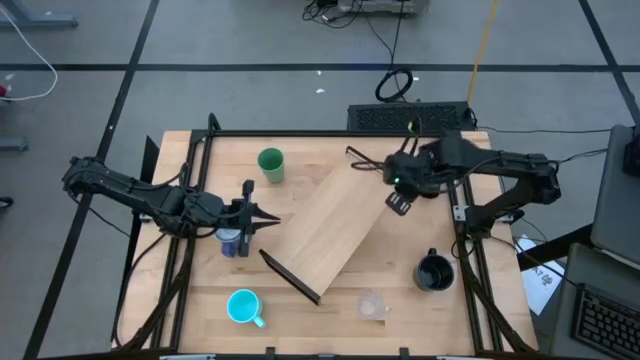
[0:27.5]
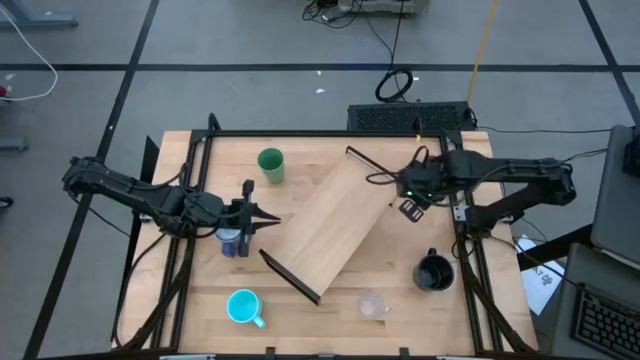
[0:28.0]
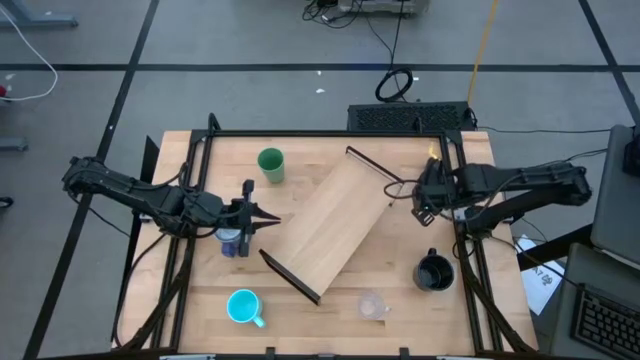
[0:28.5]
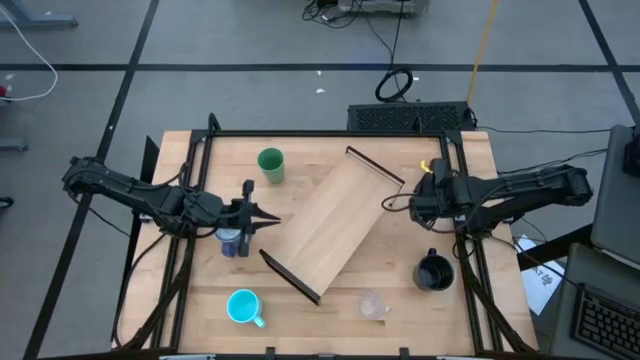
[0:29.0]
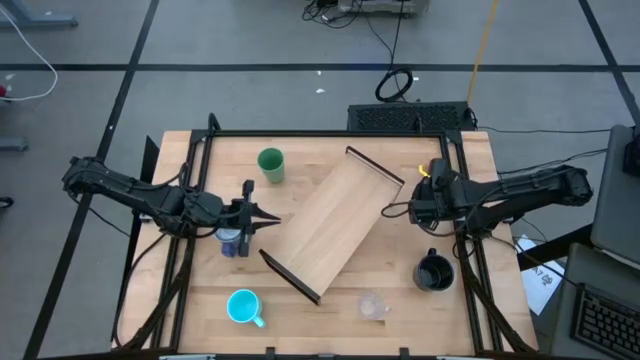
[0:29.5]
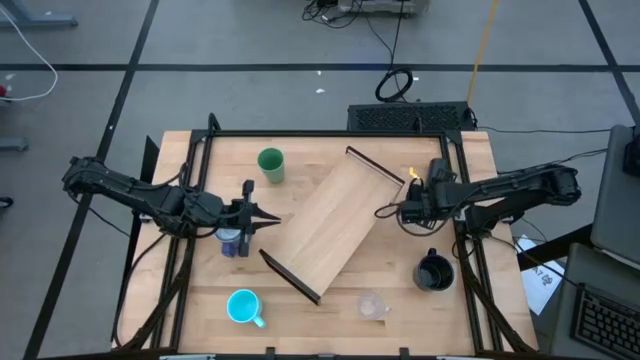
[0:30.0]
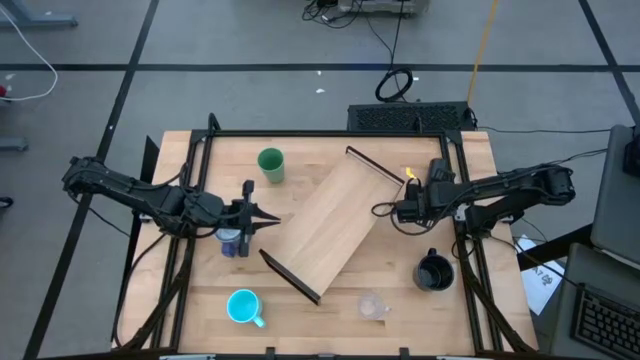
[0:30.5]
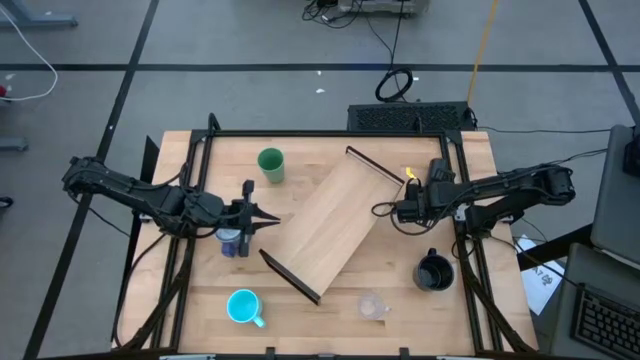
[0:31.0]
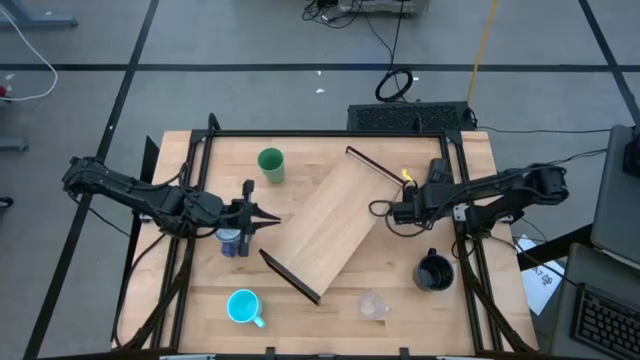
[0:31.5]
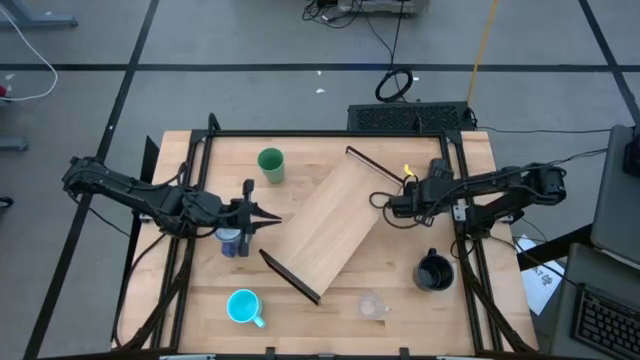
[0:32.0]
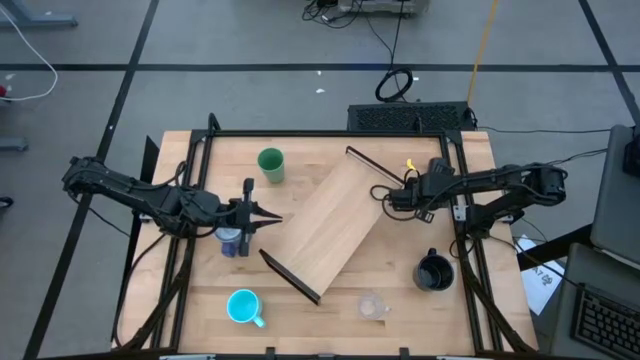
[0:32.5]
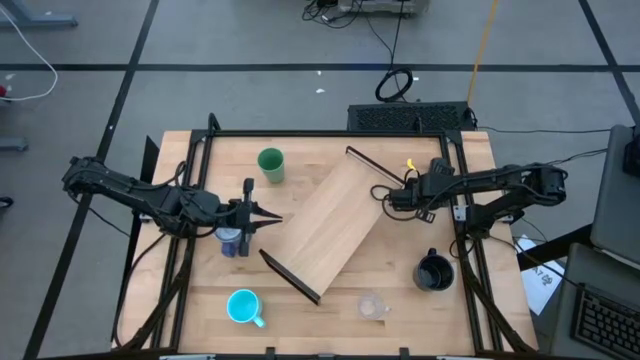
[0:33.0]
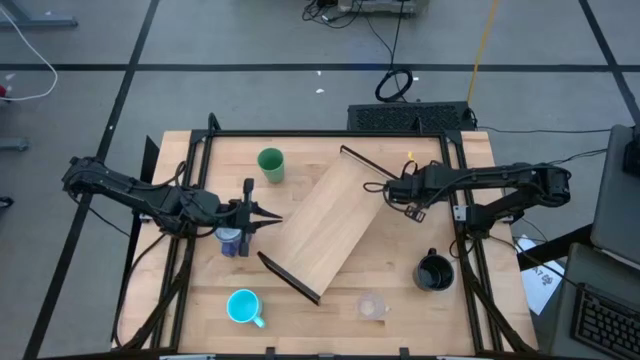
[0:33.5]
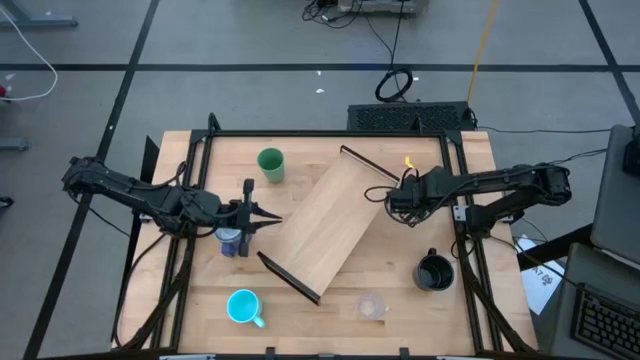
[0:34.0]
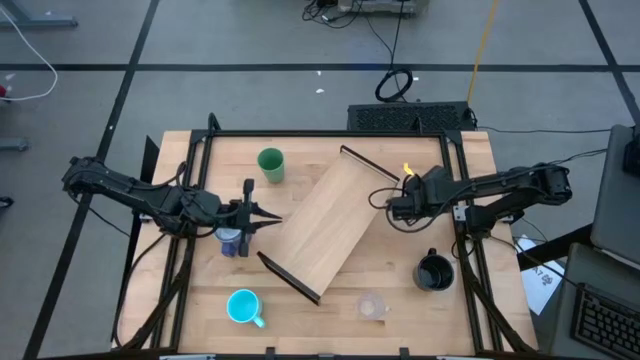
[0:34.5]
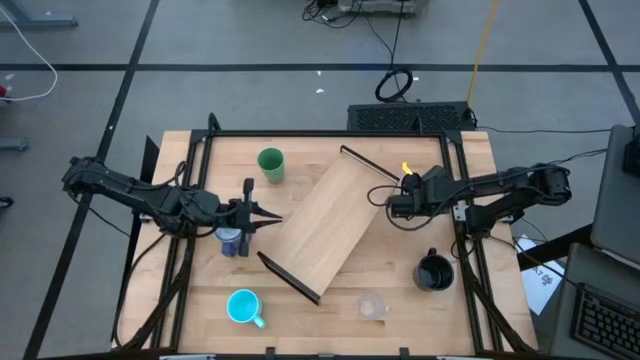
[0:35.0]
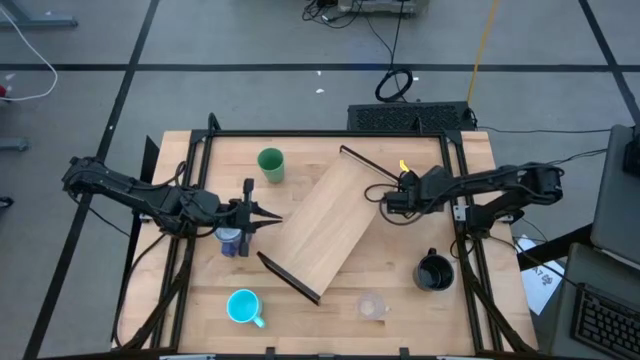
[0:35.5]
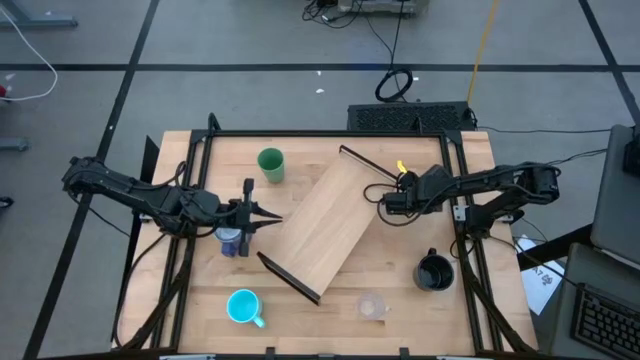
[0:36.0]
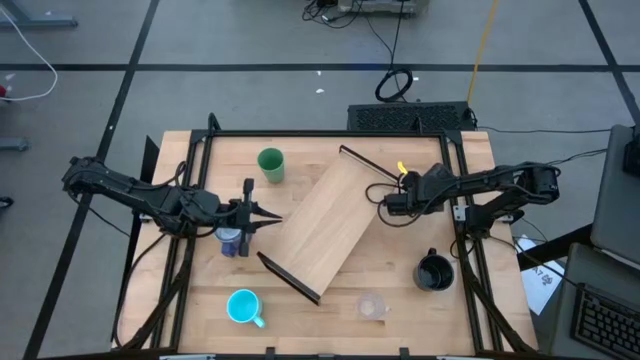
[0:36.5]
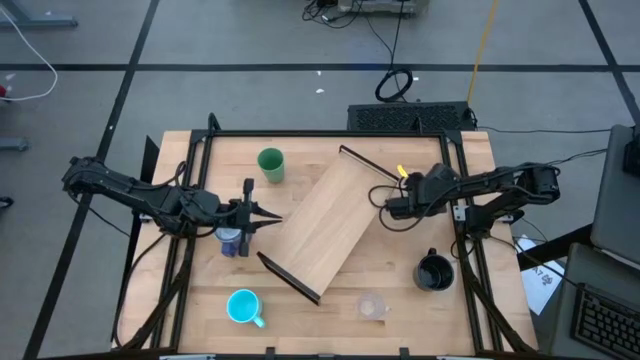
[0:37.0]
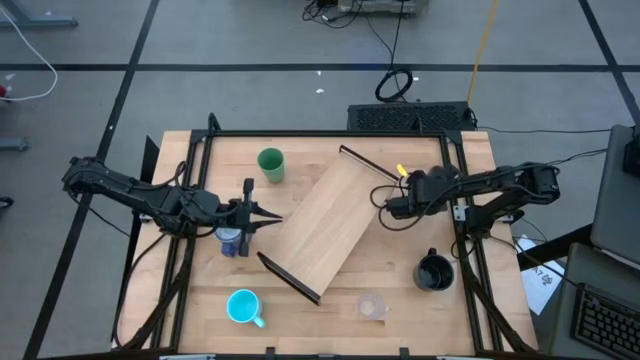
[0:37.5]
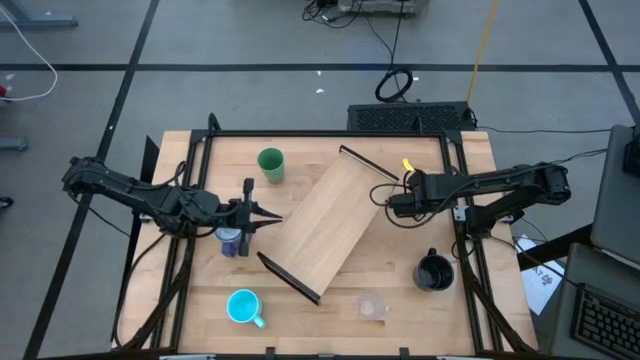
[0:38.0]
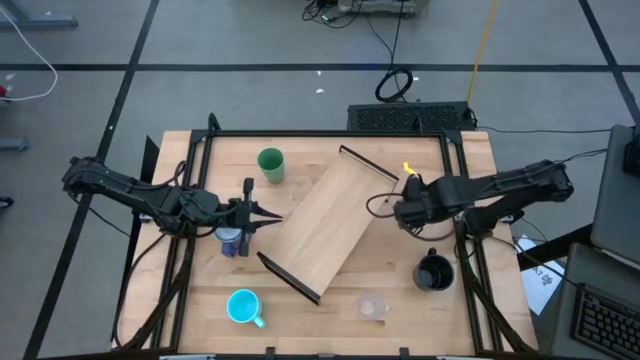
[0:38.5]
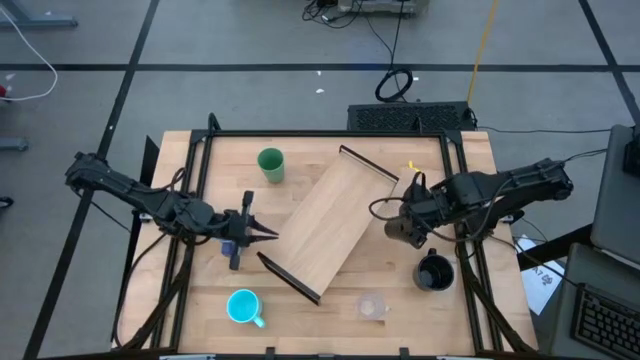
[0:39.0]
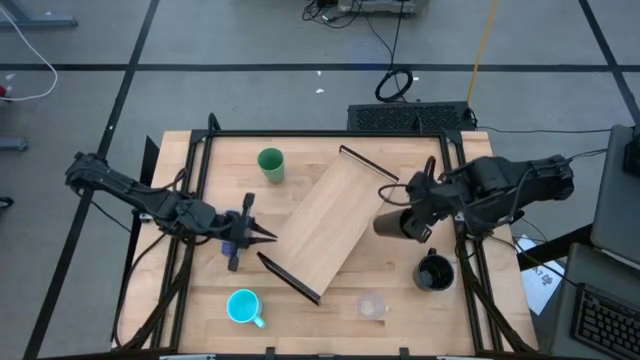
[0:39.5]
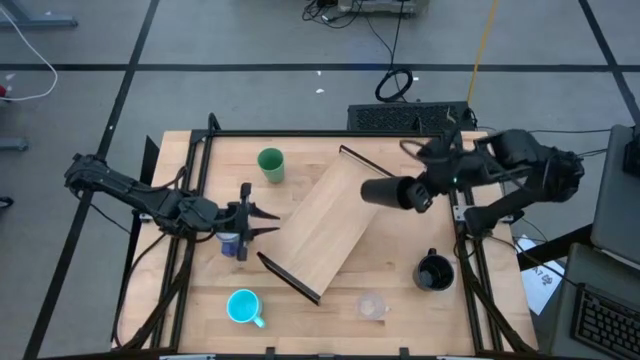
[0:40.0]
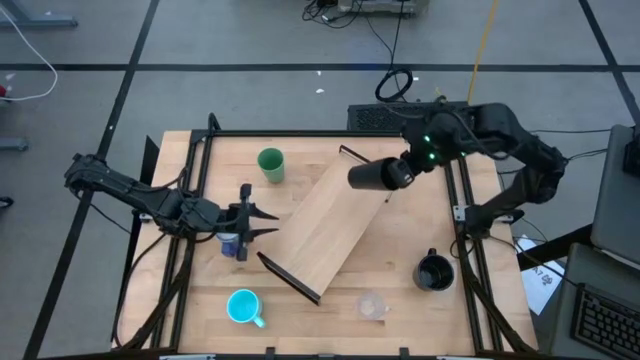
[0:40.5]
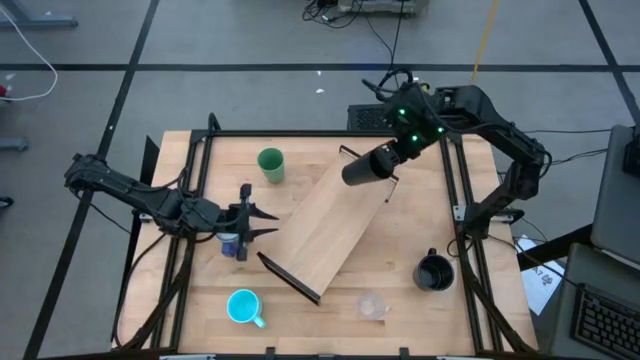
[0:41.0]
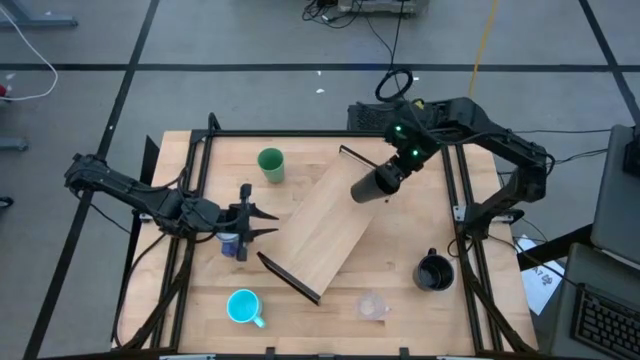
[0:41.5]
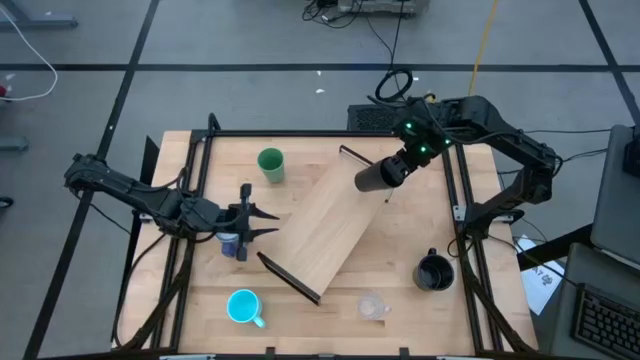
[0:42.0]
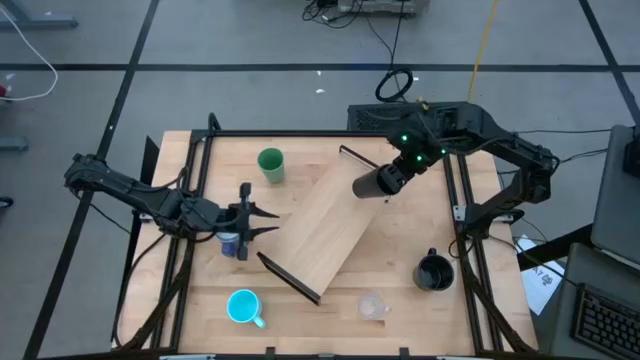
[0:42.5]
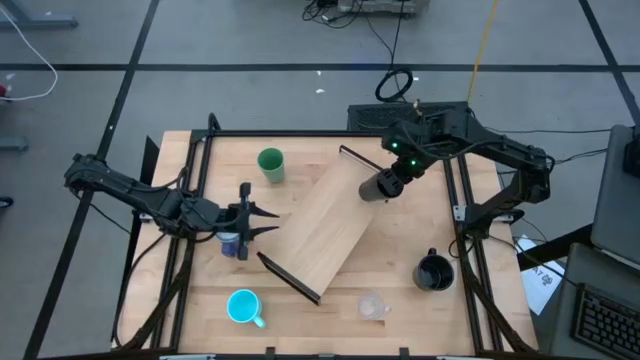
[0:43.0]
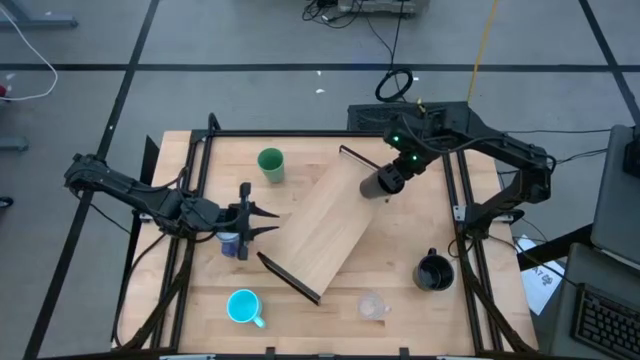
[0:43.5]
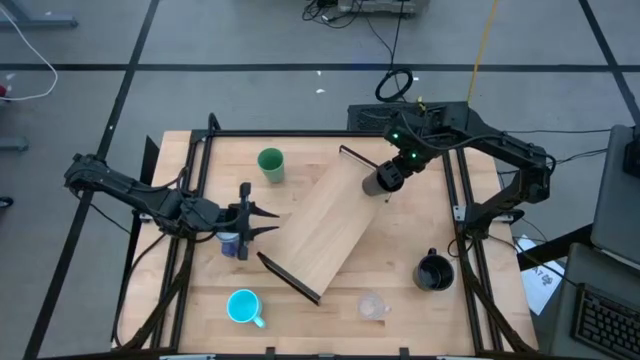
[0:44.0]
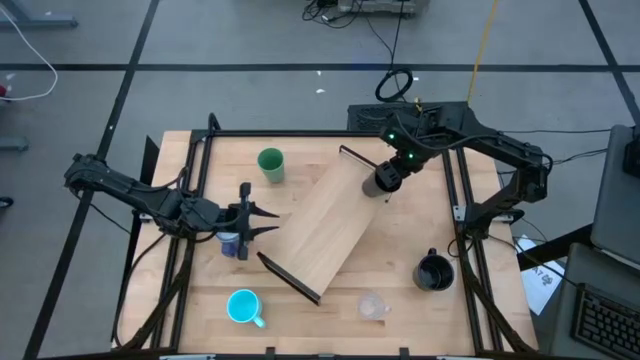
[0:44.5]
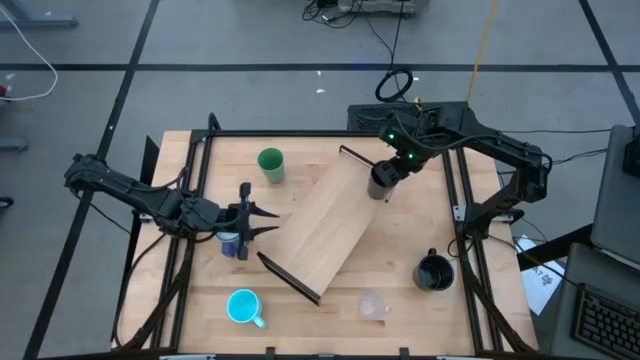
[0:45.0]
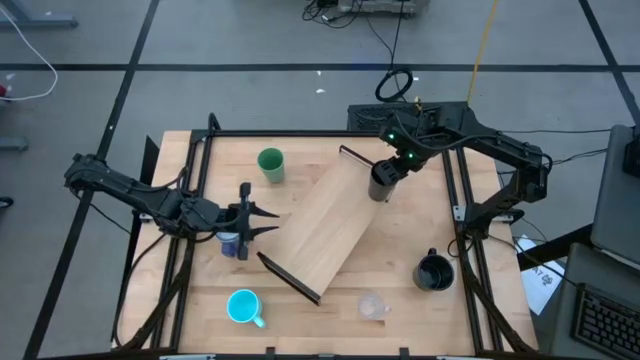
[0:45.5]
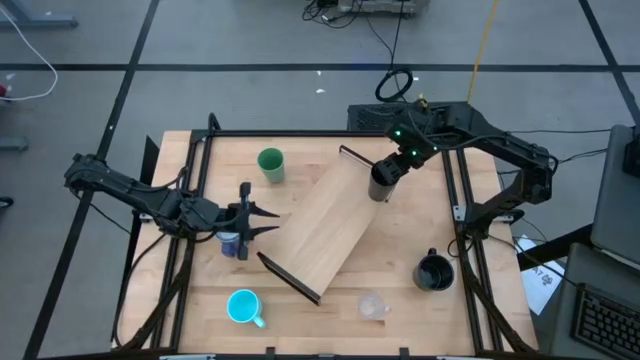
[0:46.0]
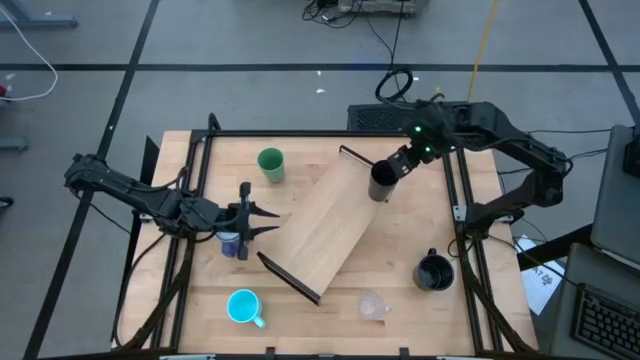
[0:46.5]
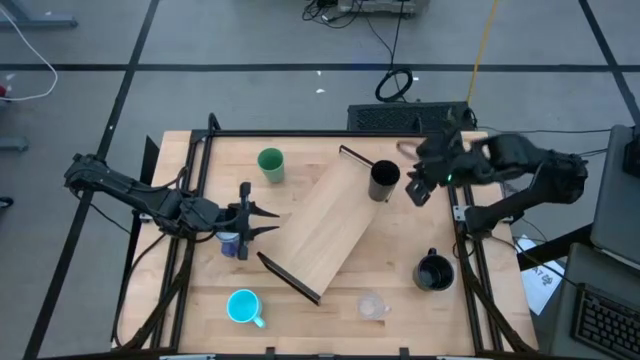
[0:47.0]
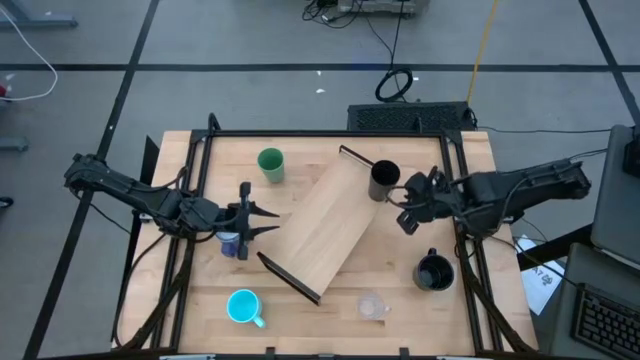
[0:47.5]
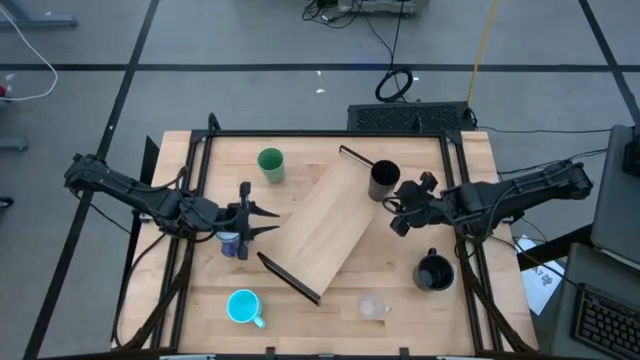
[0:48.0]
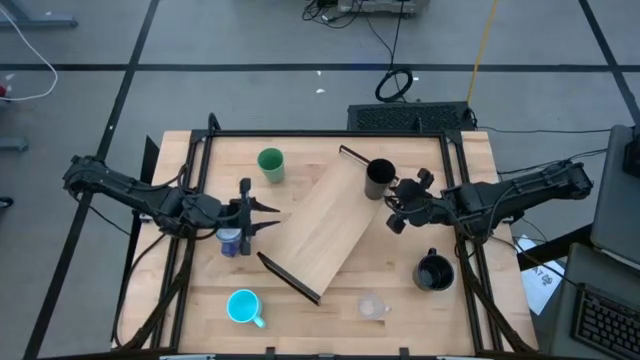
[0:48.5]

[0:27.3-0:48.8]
Task: Stack small to large cups/mugs on shelf
Put the black cup on the shelf
